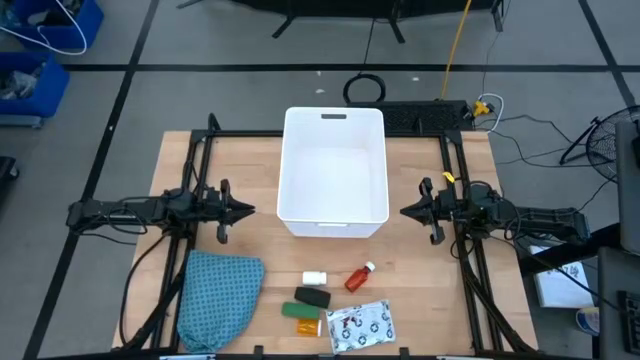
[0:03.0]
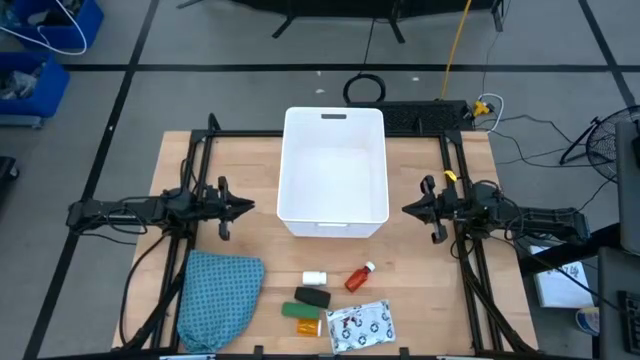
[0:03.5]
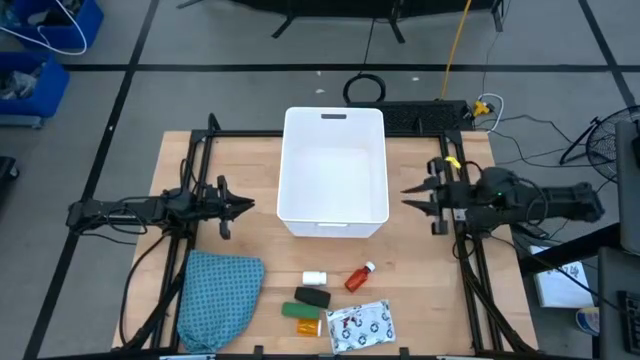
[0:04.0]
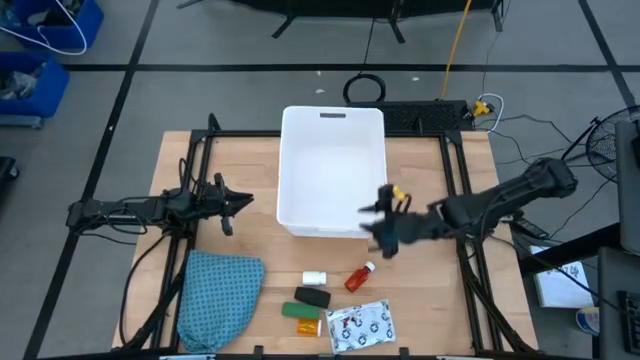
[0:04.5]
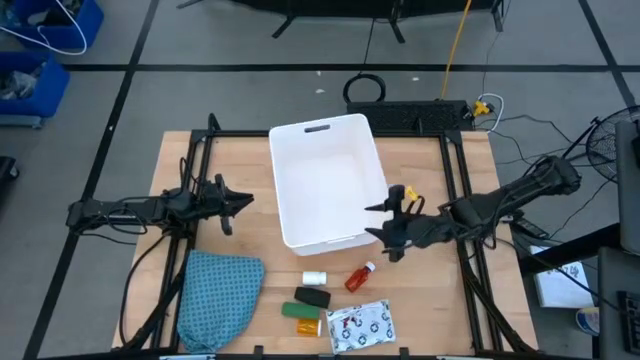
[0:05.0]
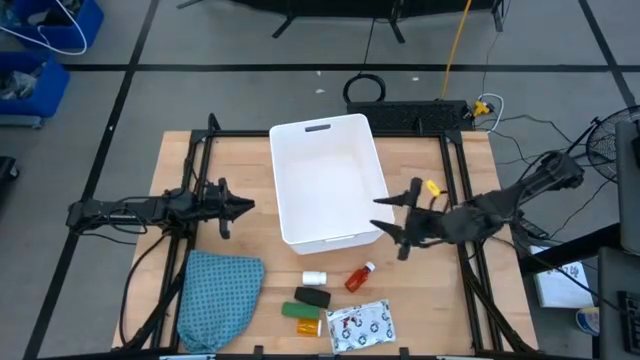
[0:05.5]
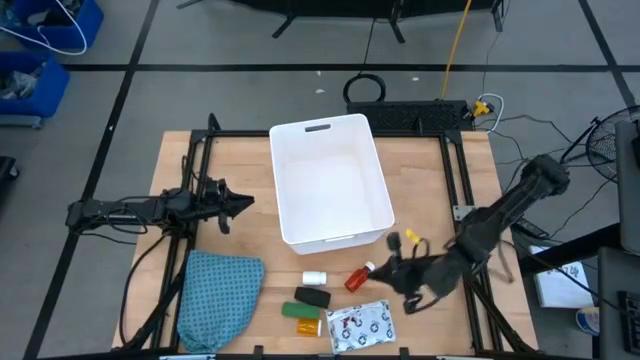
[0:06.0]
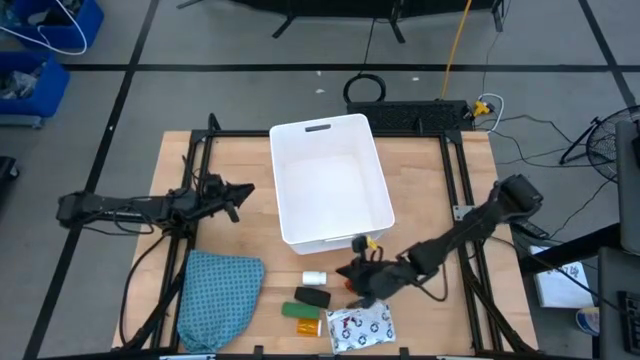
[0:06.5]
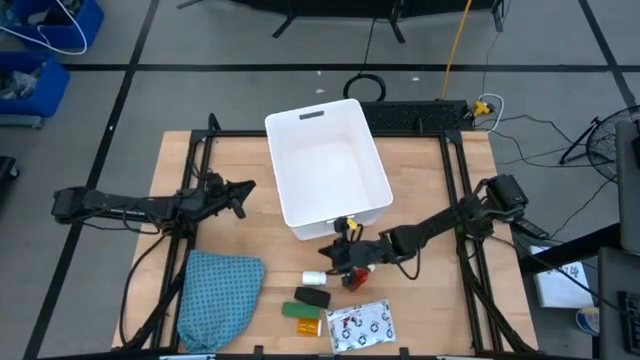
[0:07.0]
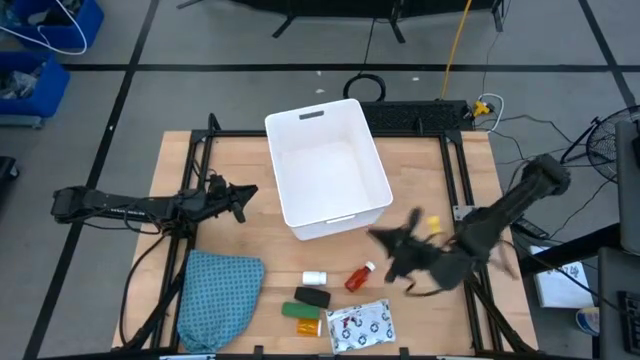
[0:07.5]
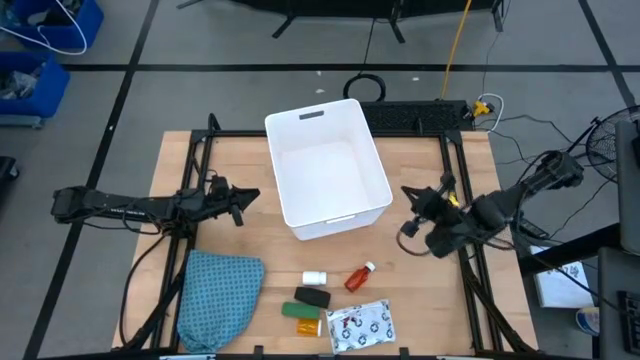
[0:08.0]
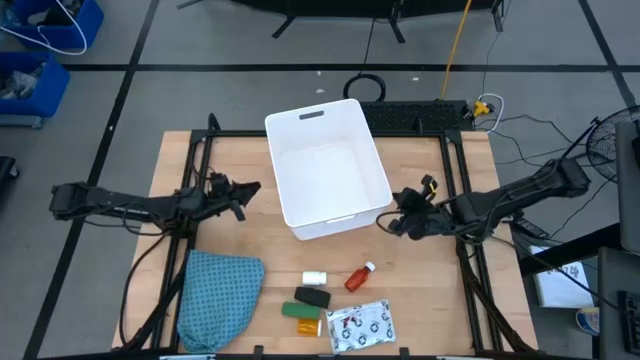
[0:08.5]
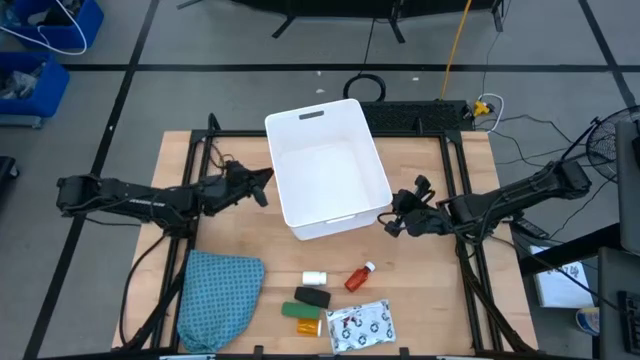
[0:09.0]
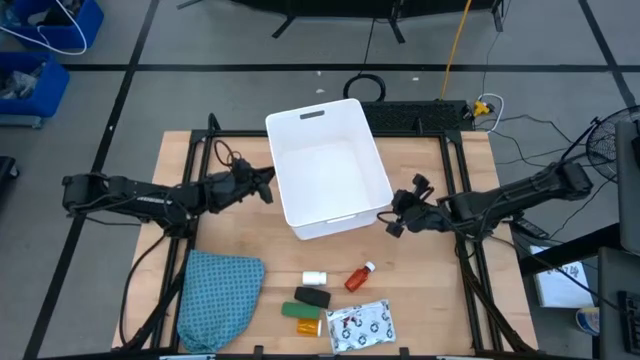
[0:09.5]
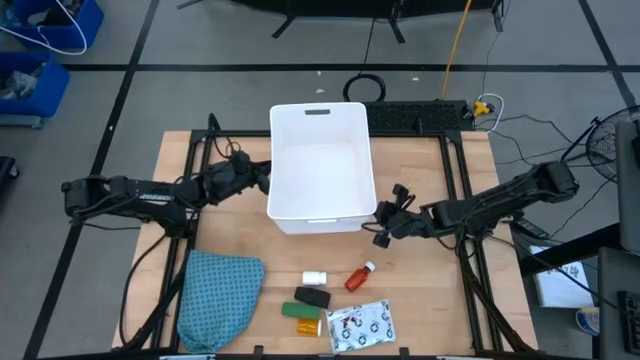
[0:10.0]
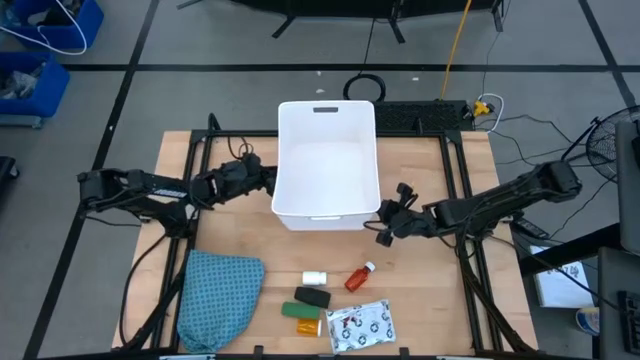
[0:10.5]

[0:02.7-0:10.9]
Task: Pick & place medical supplies in basket/bin
Adjust the white bin

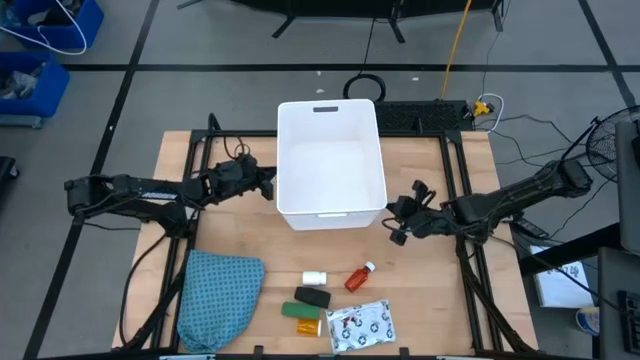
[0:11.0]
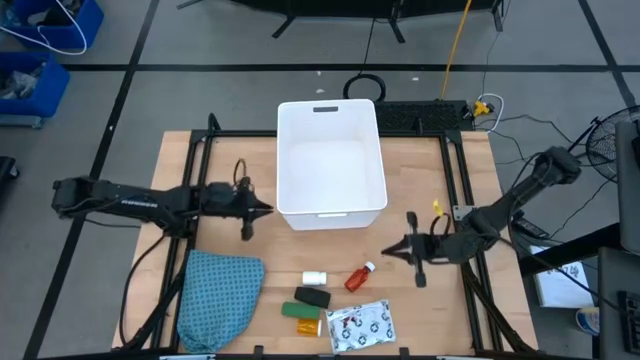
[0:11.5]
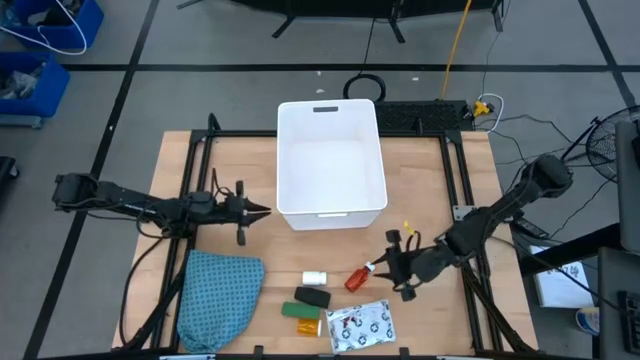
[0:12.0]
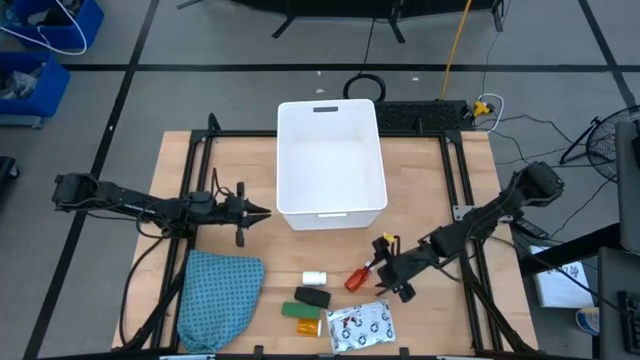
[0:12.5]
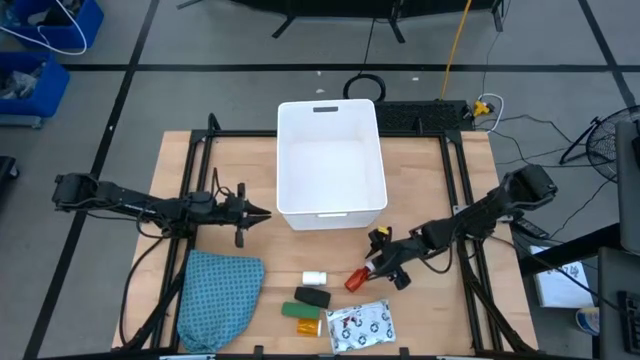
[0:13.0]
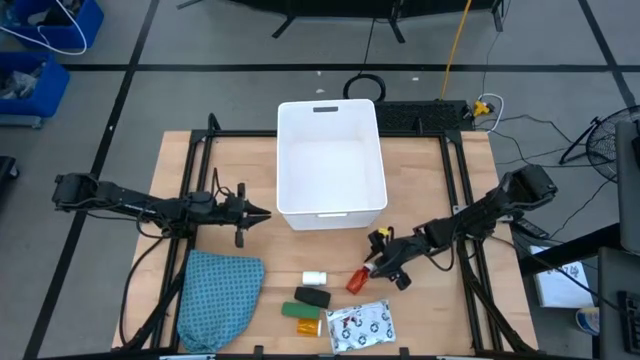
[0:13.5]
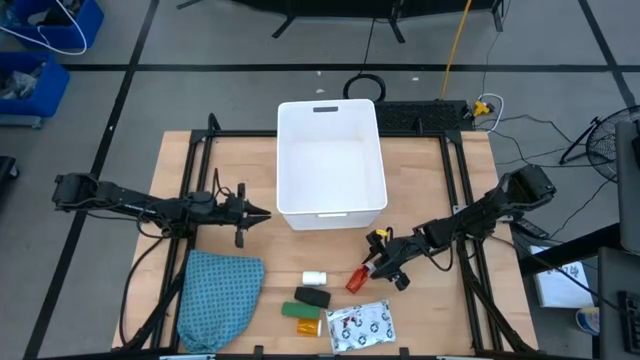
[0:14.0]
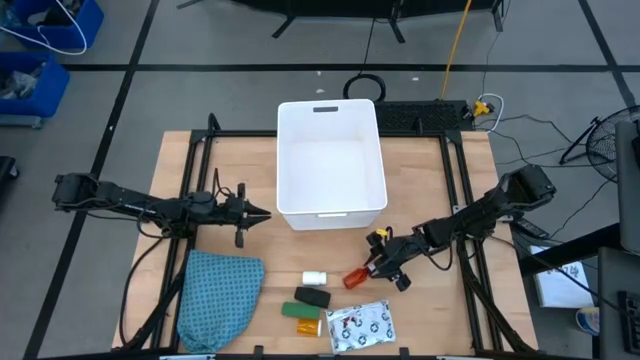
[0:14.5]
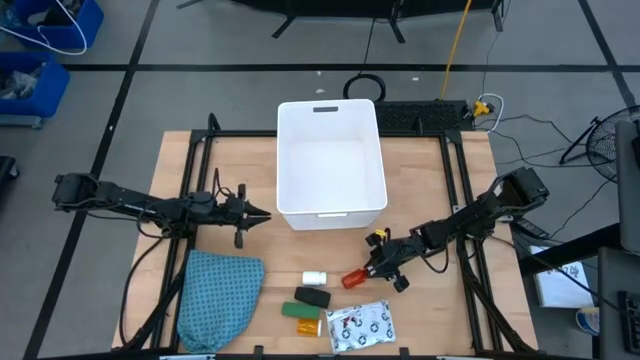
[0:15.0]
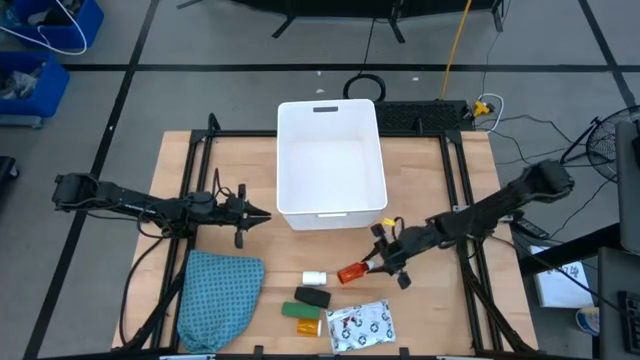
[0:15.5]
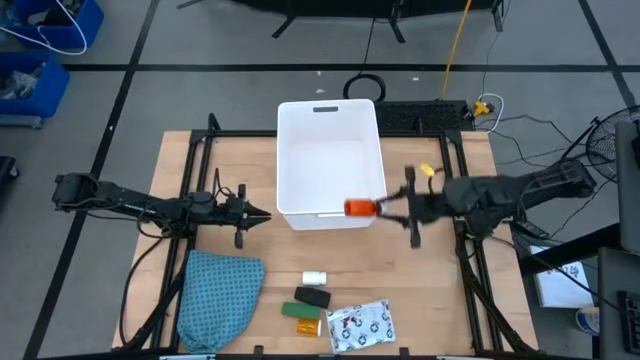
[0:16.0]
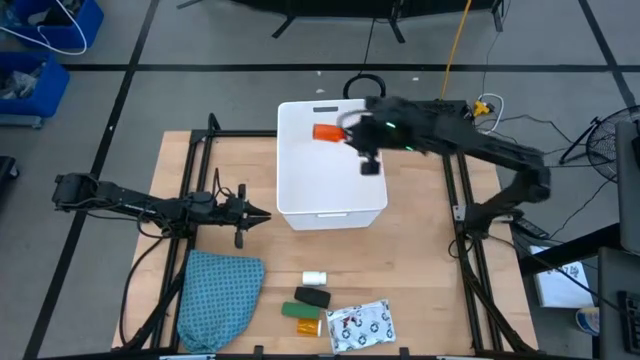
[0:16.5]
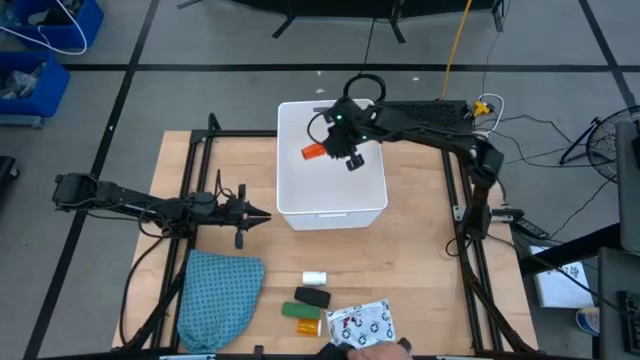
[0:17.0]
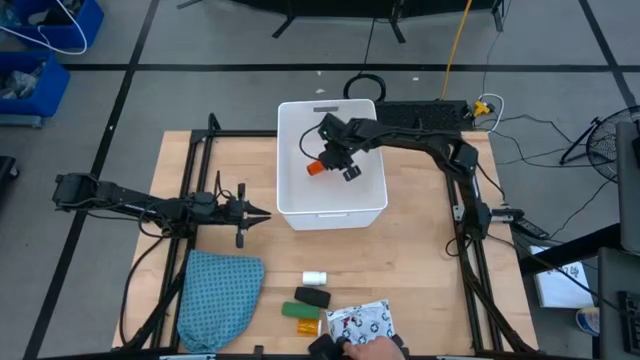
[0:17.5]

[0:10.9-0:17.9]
Put the red pill bottle into the white bin

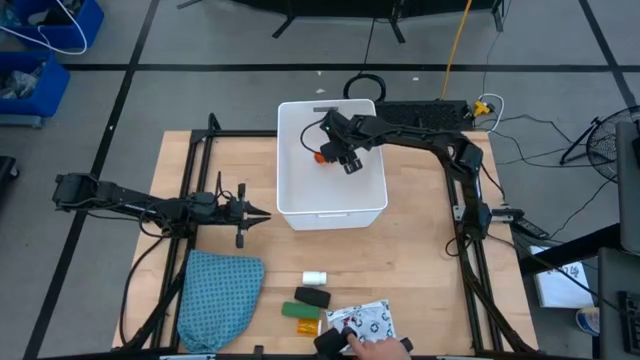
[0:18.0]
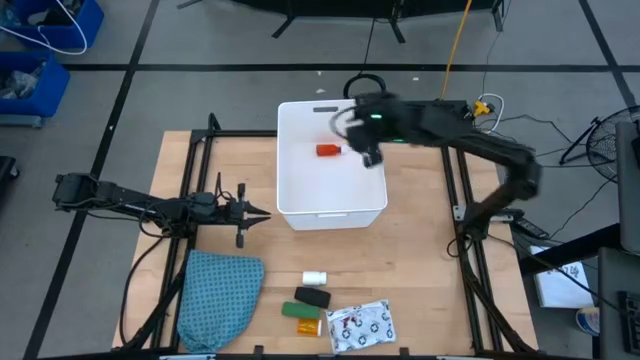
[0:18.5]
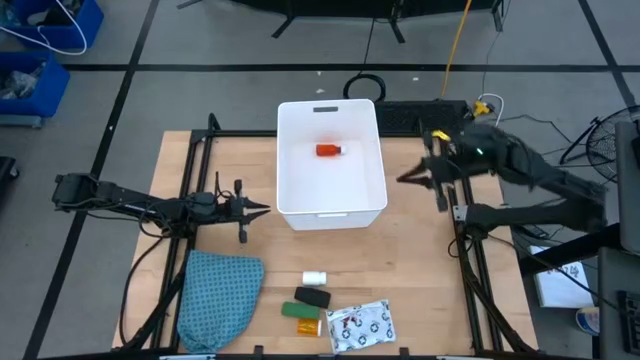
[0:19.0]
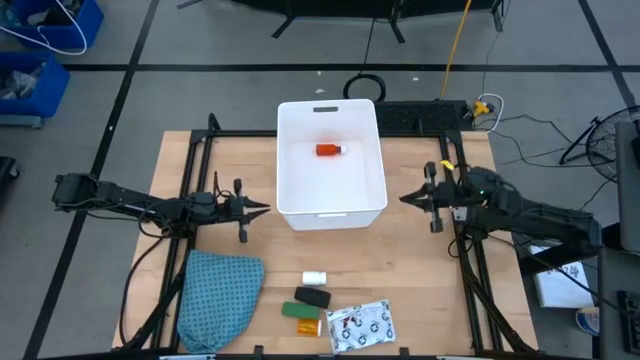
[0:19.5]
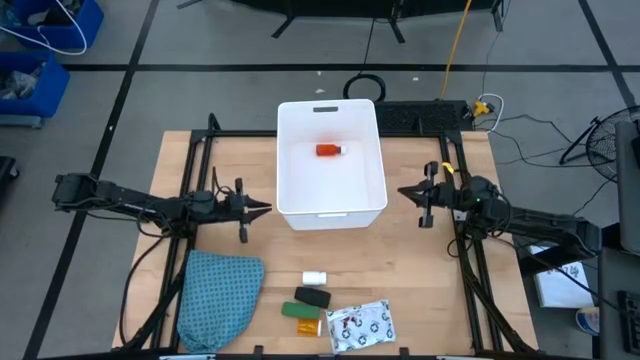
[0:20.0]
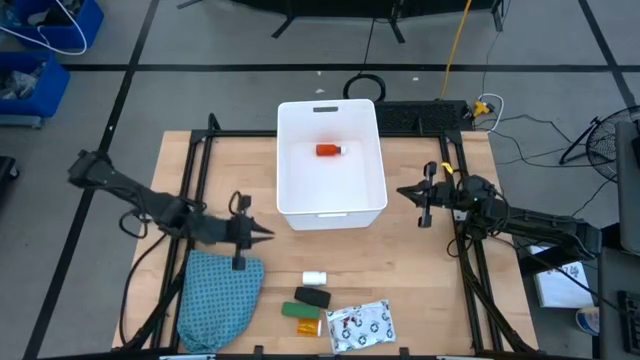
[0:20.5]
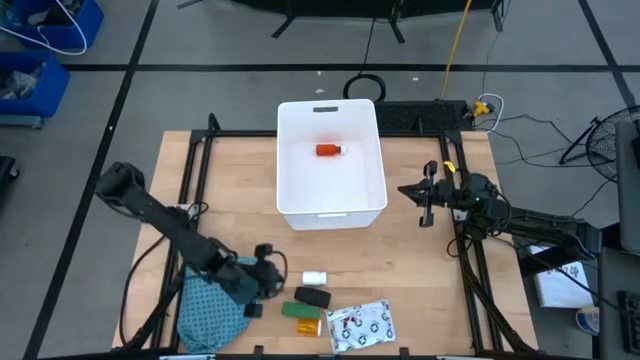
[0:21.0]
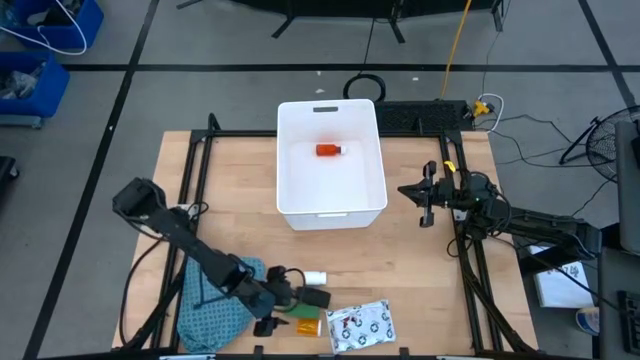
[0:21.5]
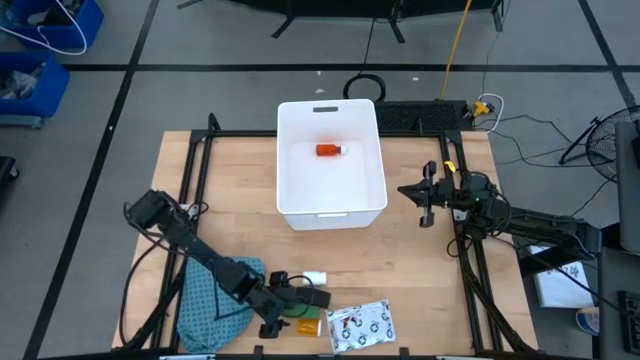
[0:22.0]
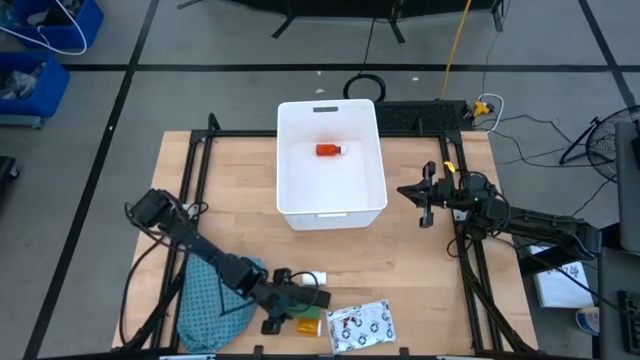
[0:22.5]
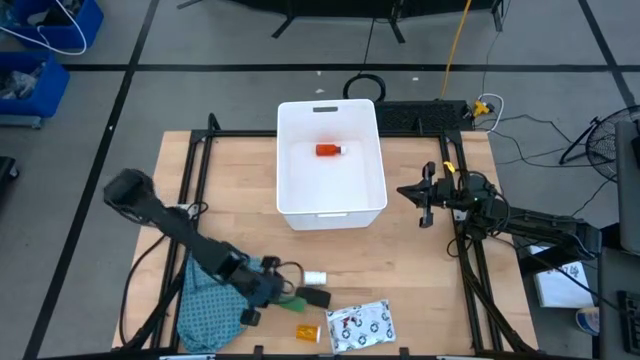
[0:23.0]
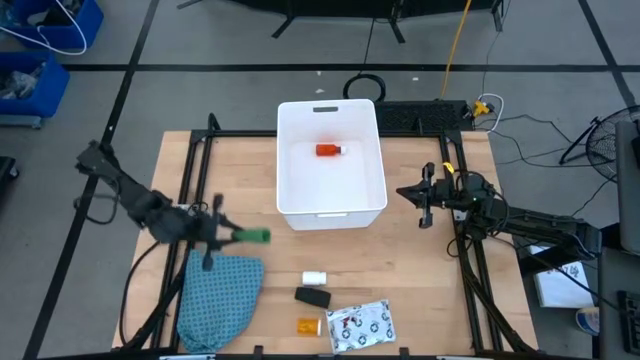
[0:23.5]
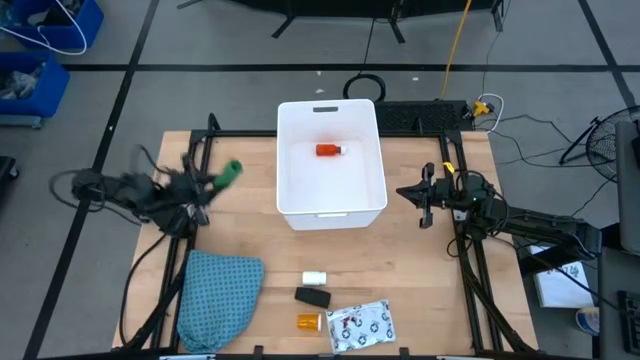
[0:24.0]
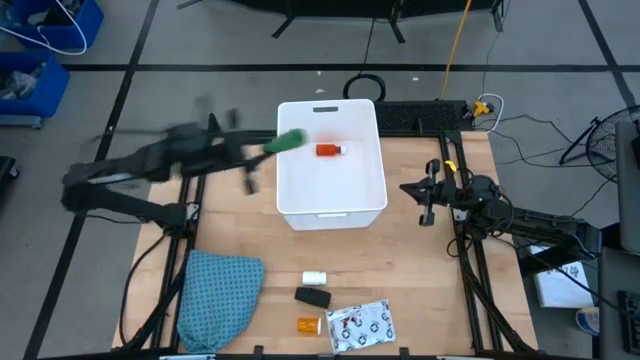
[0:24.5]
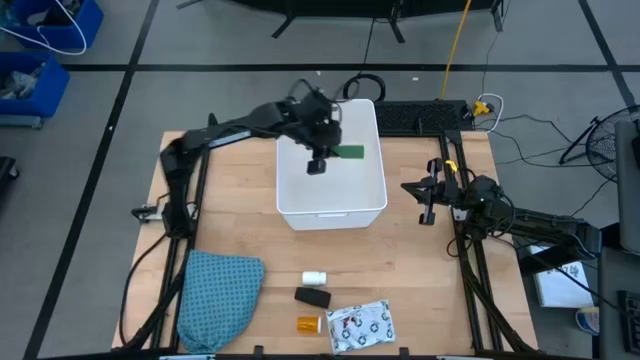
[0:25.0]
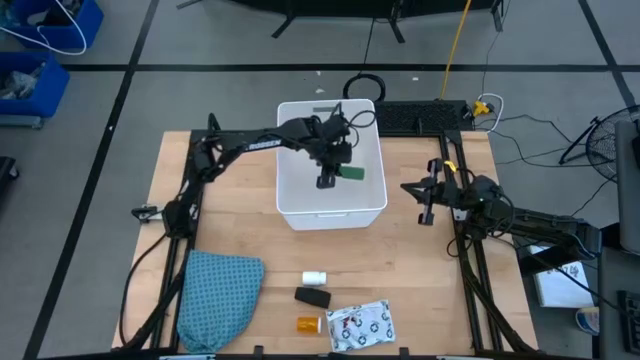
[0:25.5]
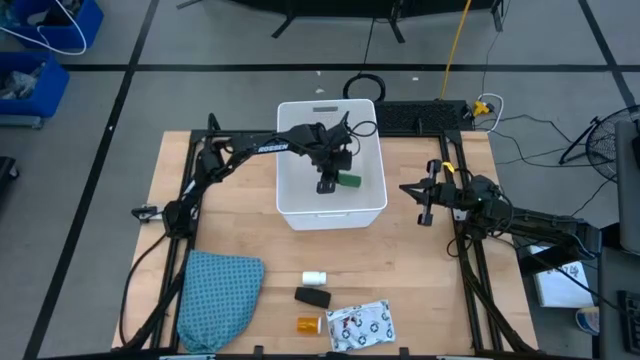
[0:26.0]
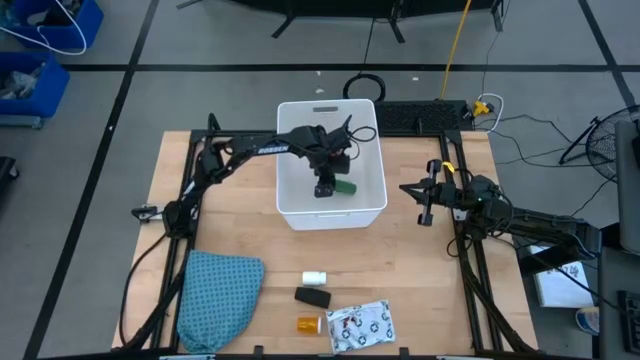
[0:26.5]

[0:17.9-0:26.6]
Put the green bandage into the white bin
